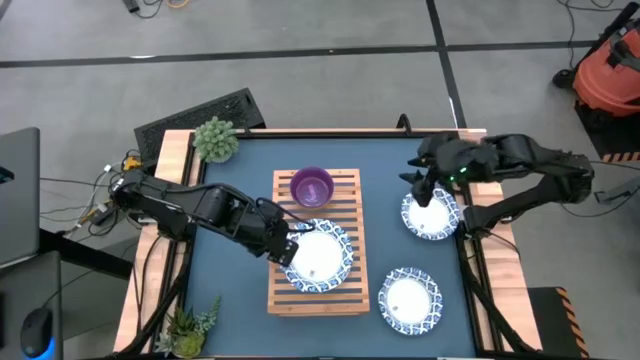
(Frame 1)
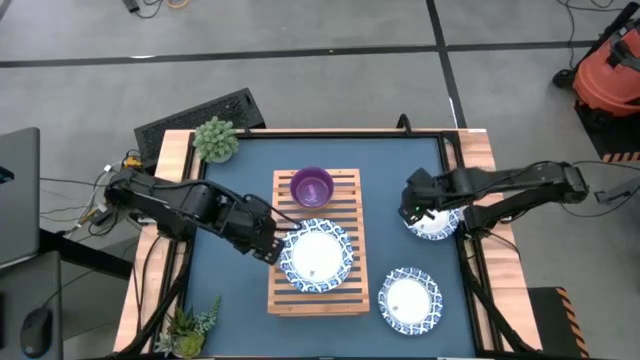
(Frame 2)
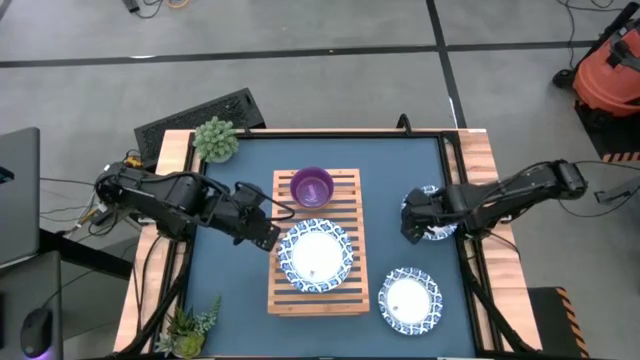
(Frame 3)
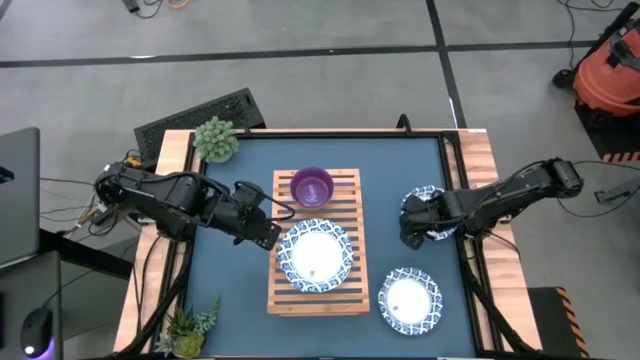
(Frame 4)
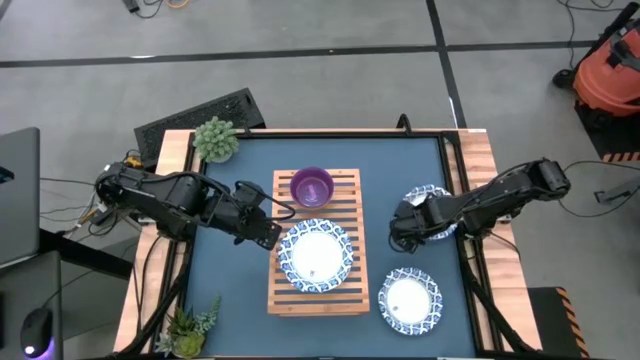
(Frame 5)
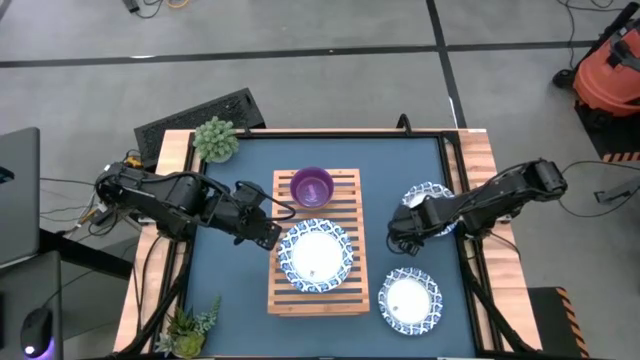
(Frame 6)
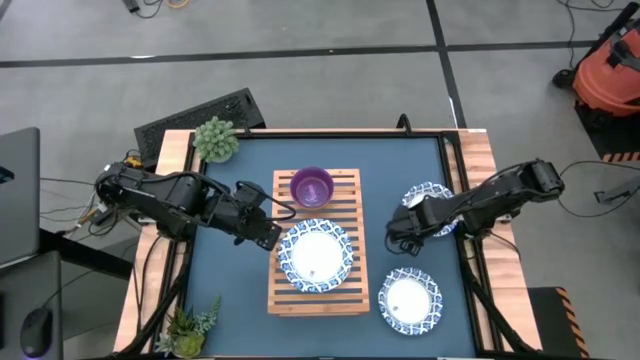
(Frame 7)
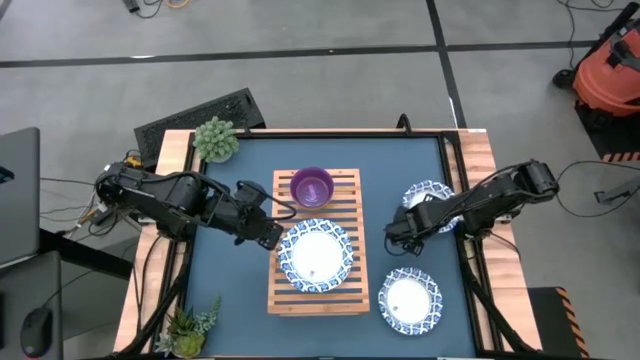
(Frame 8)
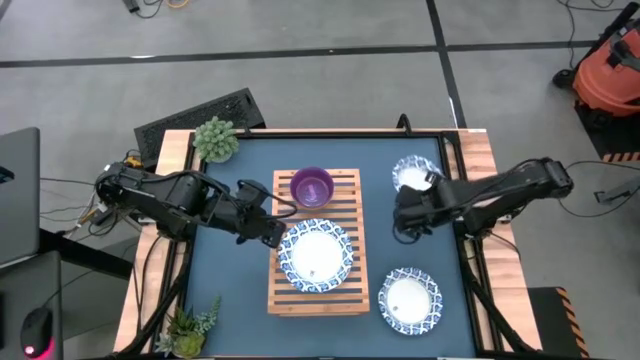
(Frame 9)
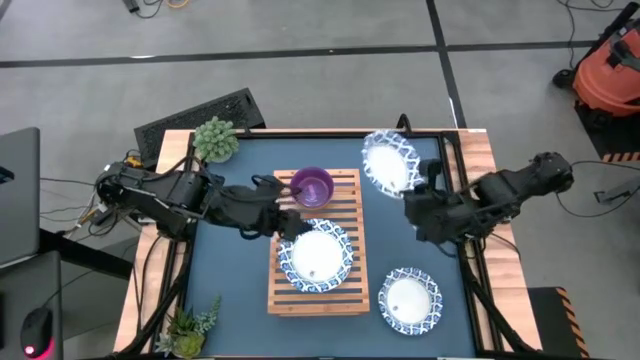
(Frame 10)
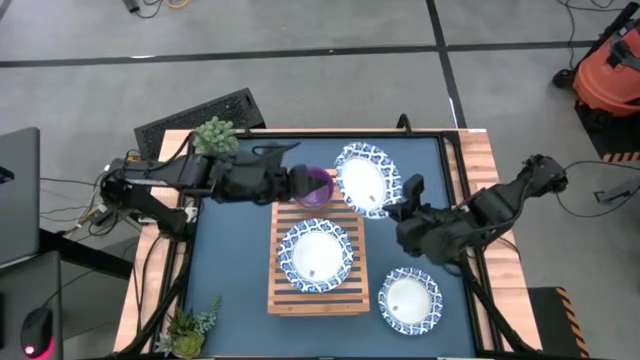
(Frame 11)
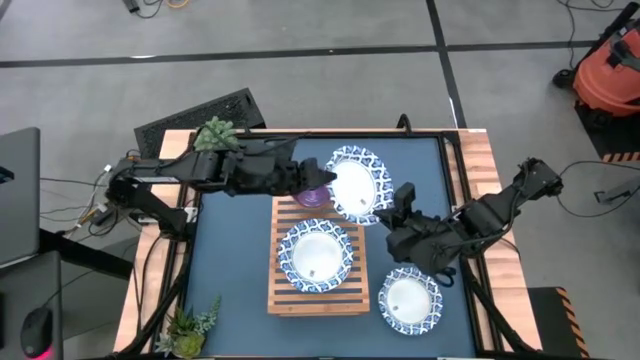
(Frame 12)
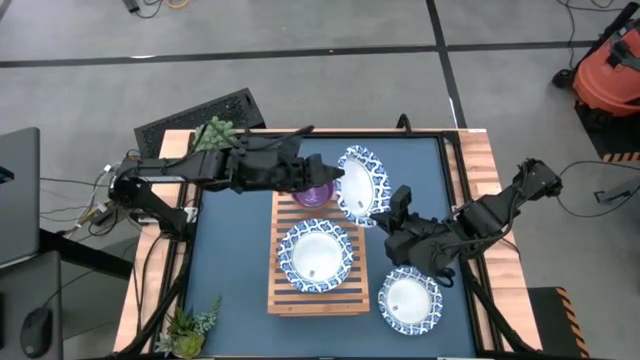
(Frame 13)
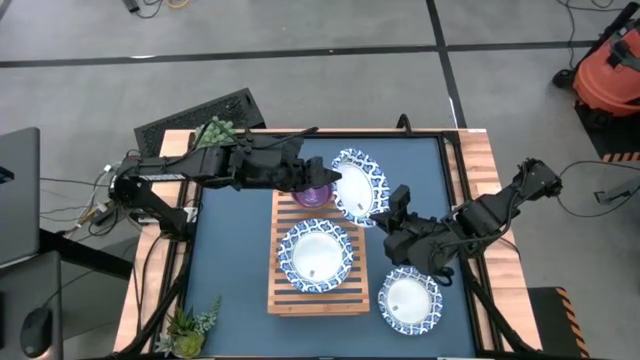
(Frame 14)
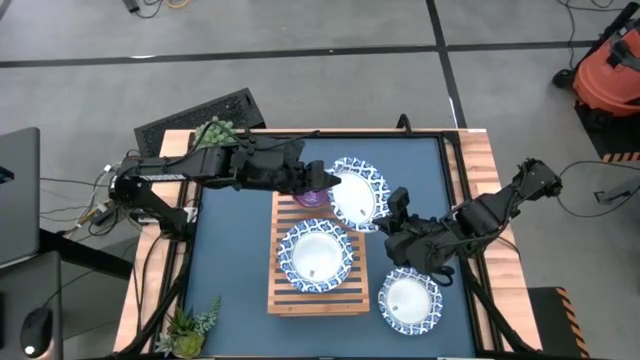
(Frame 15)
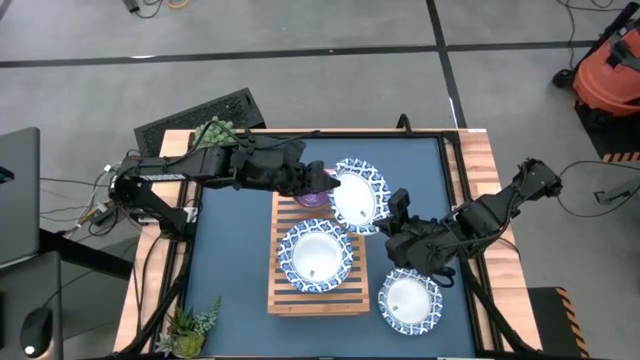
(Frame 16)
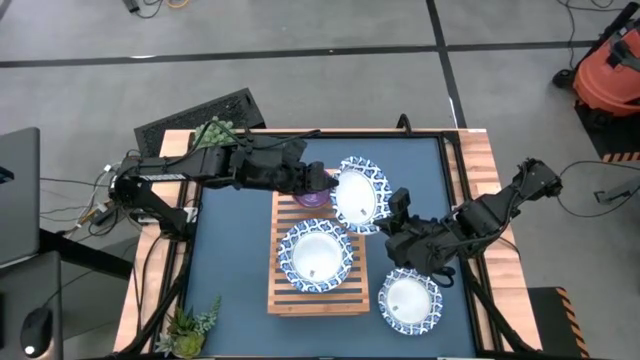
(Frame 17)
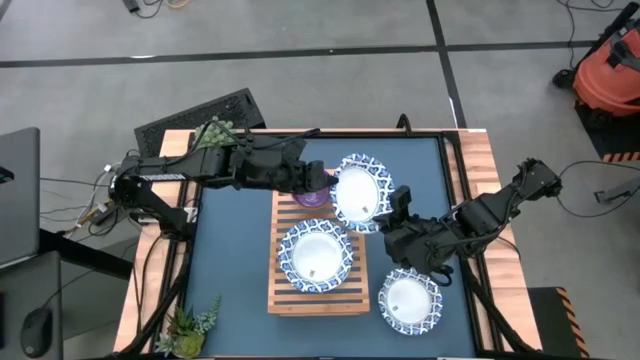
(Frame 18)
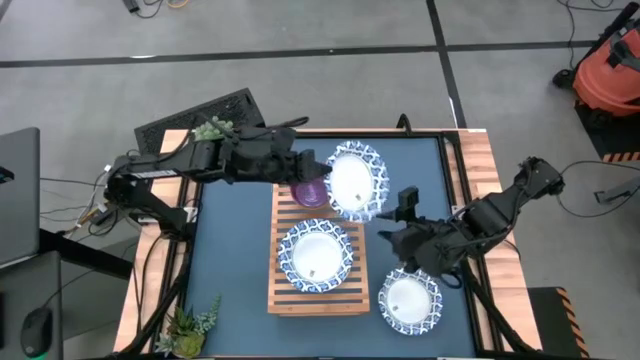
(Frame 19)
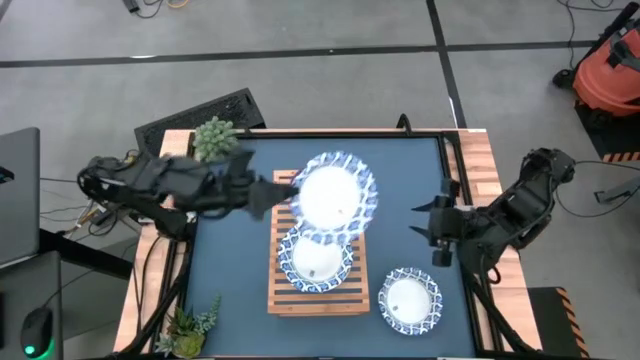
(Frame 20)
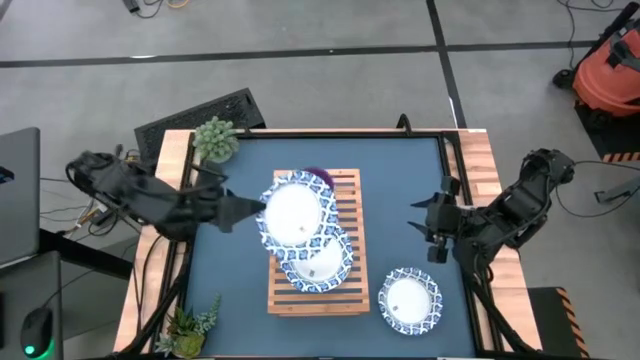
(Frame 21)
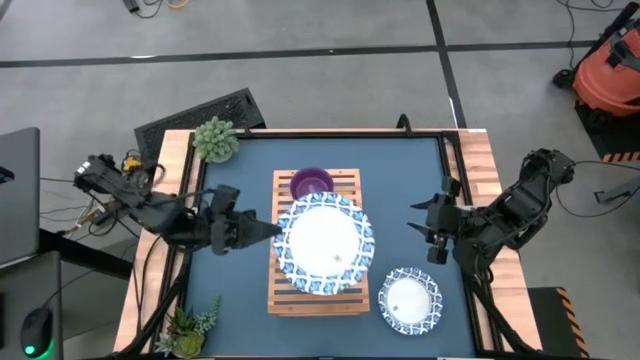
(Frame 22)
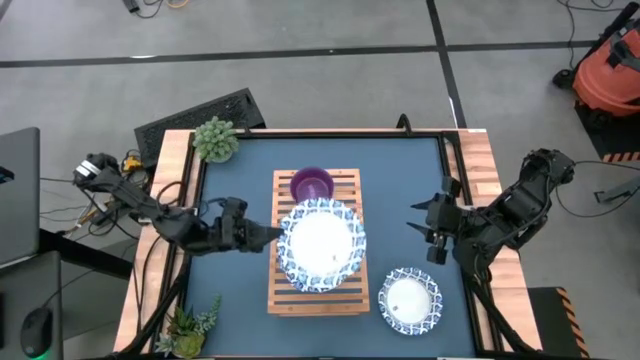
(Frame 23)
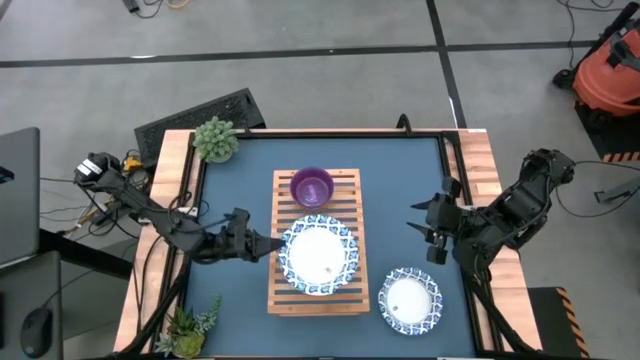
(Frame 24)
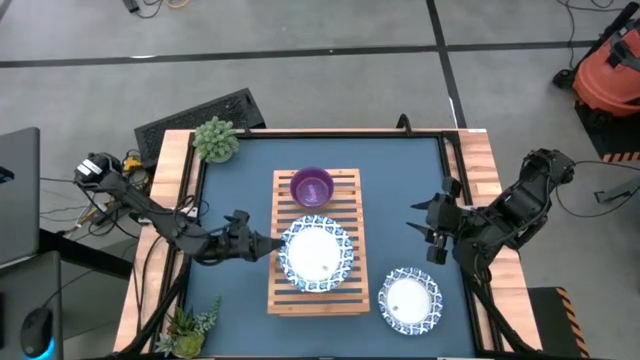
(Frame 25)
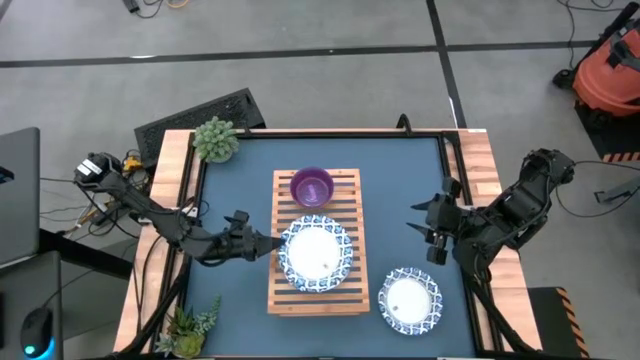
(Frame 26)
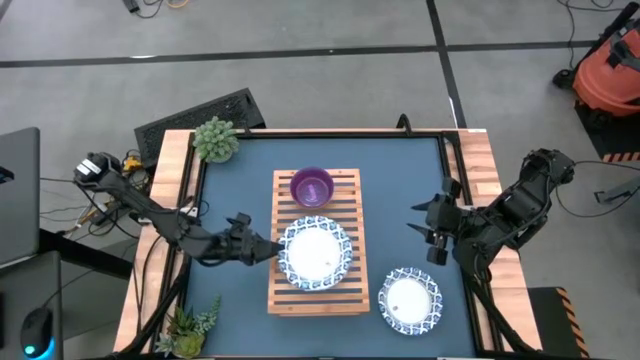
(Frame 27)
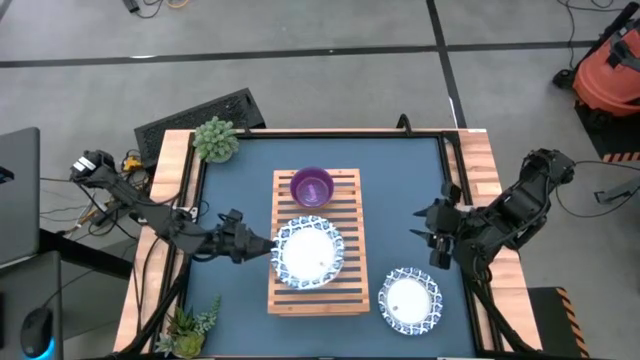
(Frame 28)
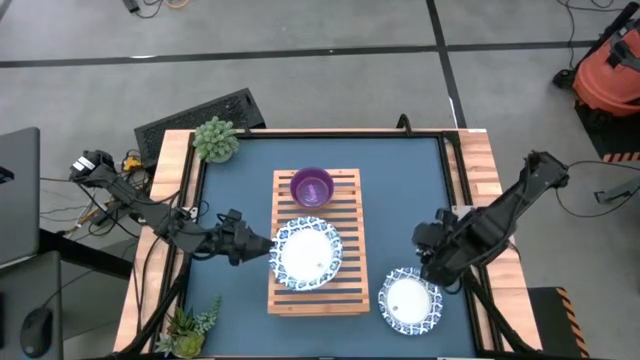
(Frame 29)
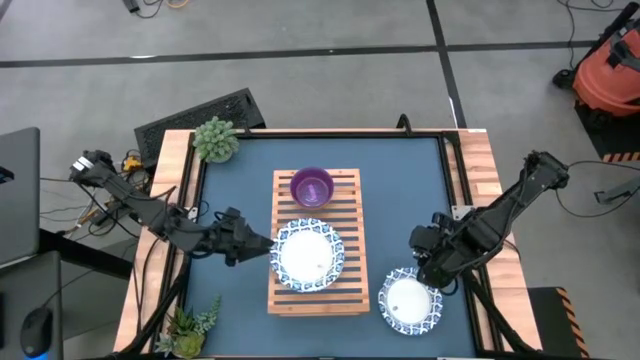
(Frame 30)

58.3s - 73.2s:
Task: Place and stack bowls onto a shelf
Stack the top big white and blue bowl on top of the big white and blue bowl

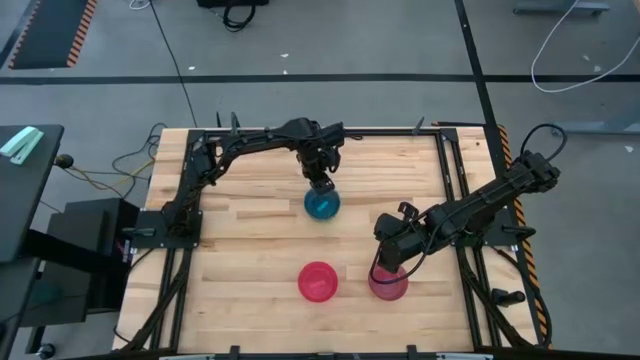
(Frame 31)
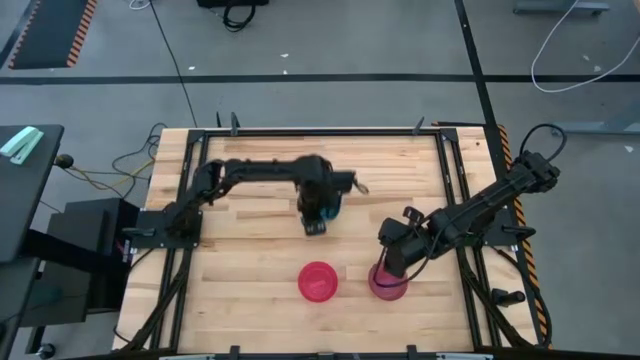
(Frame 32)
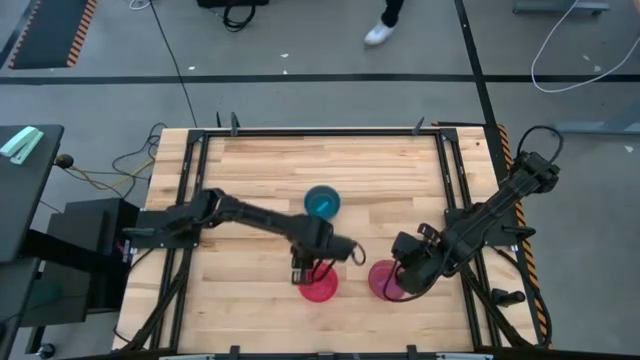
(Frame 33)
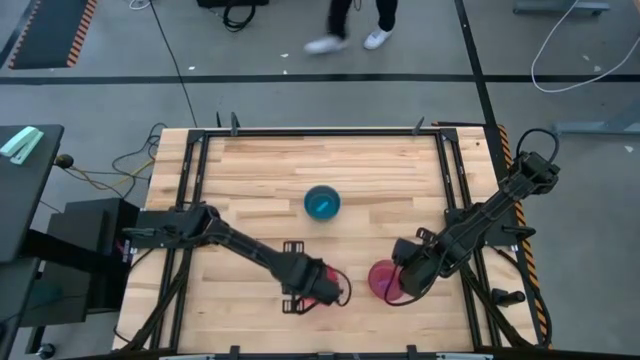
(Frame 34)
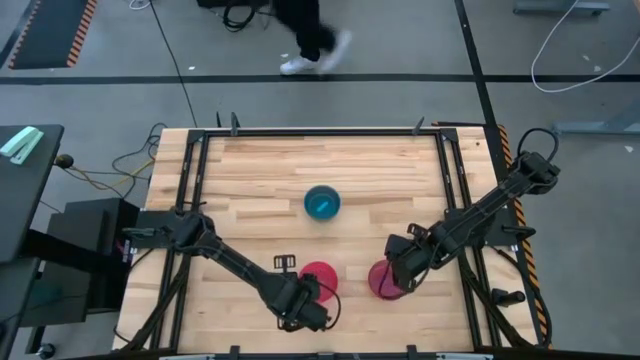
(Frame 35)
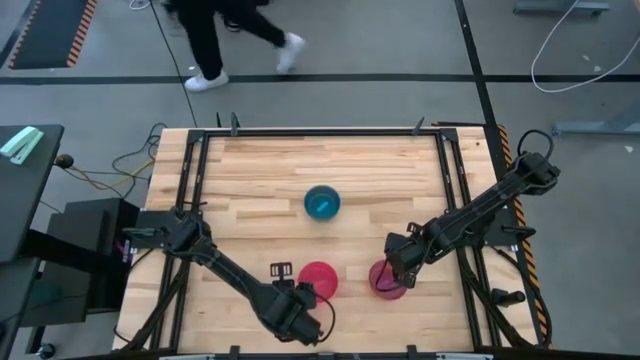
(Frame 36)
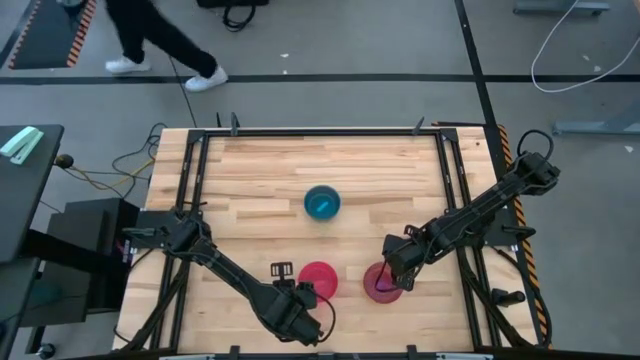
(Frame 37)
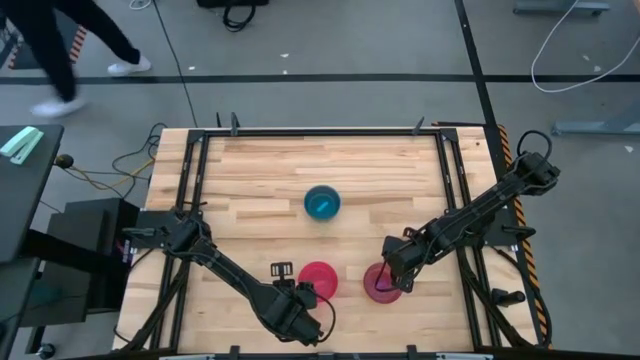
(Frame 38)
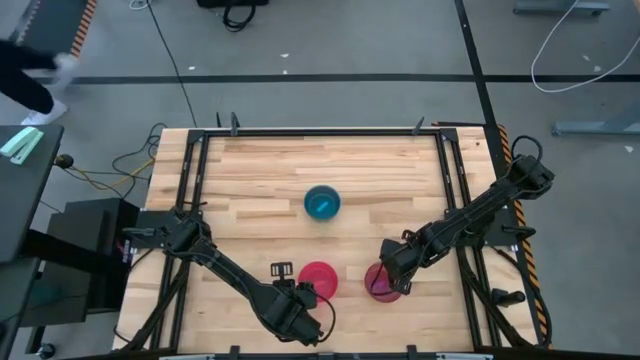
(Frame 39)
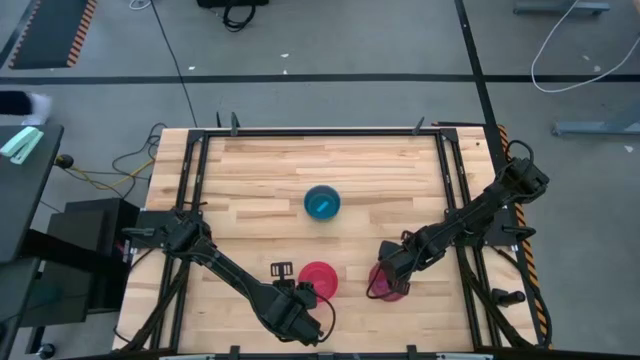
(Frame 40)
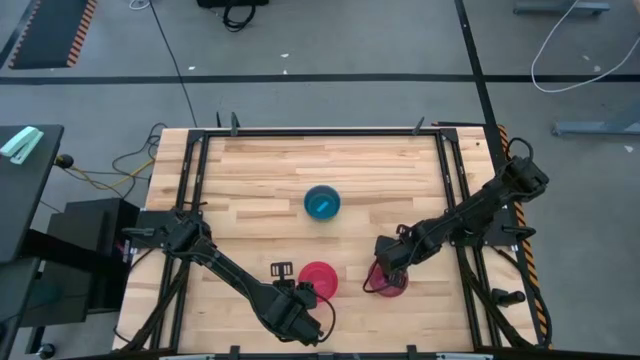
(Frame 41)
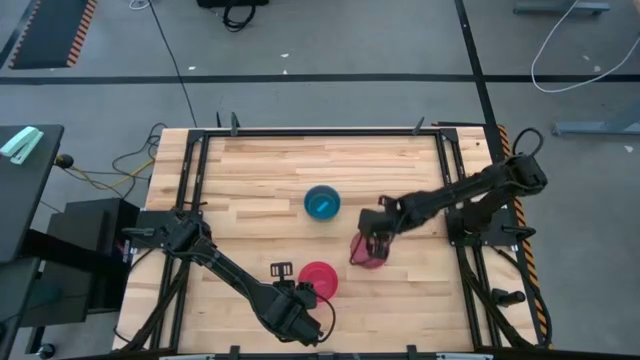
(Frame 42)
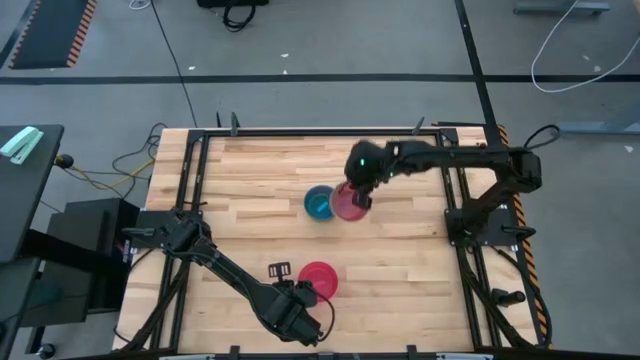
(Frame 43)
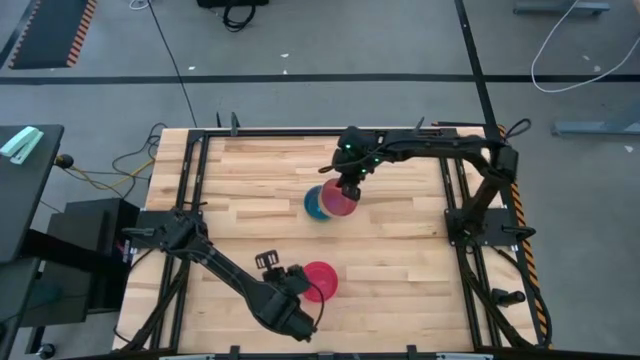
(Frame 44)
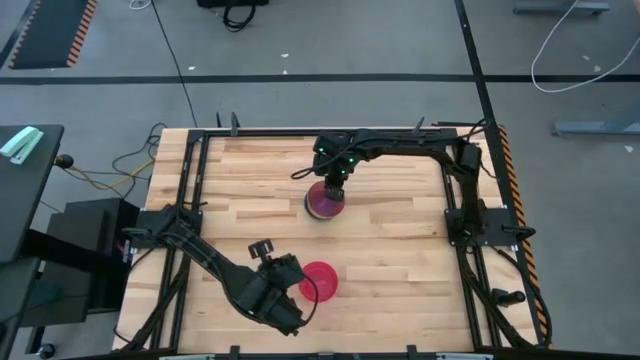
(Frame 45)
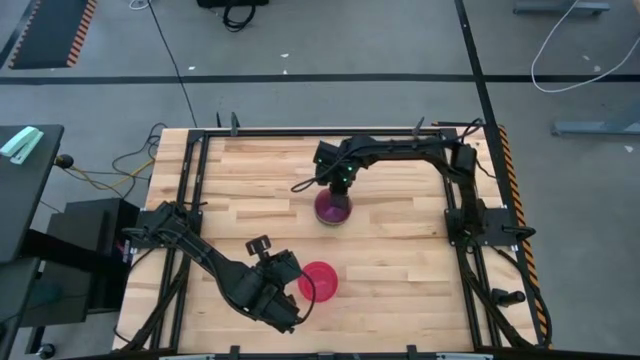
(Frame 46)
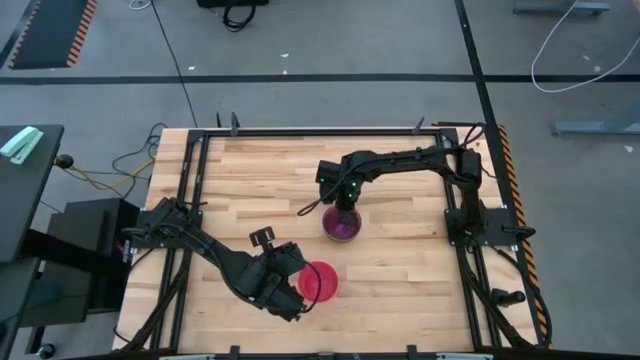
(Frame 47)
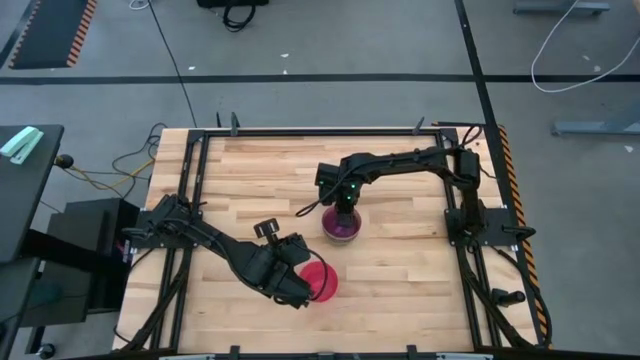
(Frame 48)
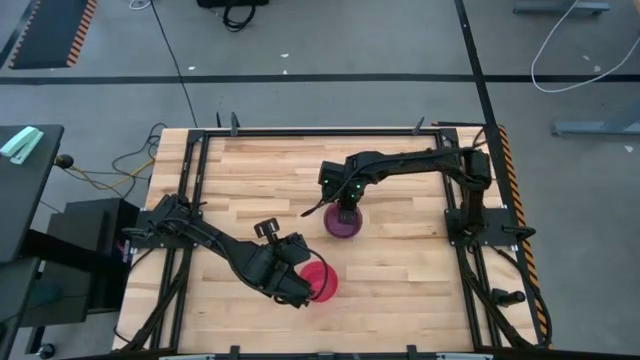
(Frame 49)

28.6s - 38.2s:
Task: Nest bowls inside each other
Stack the purple and yellow bowls on the blue bowl
